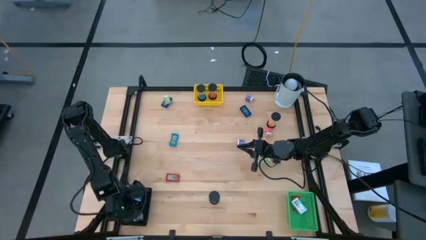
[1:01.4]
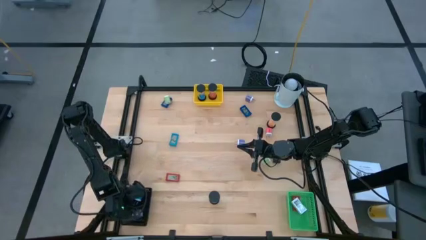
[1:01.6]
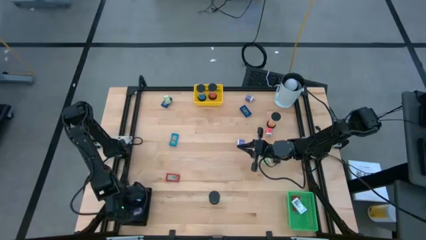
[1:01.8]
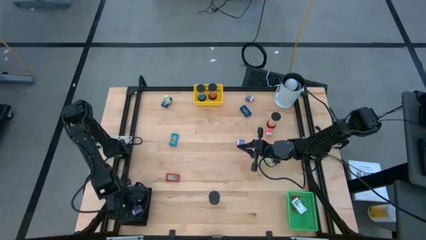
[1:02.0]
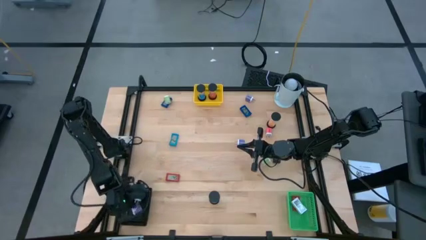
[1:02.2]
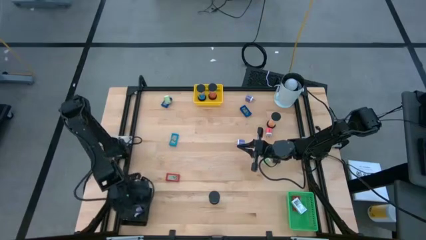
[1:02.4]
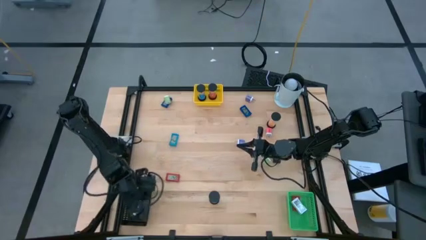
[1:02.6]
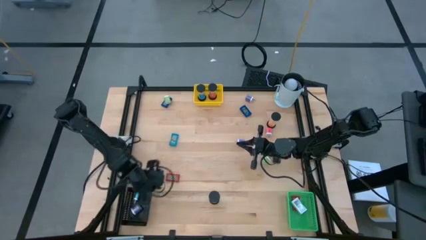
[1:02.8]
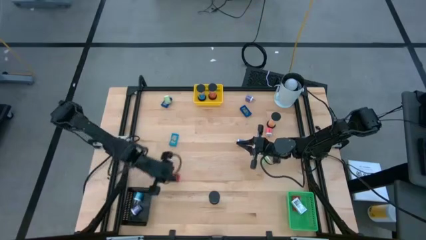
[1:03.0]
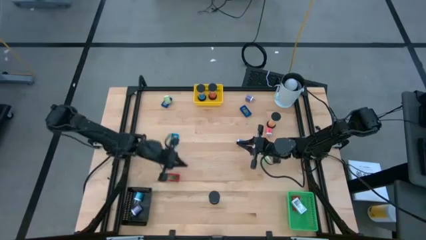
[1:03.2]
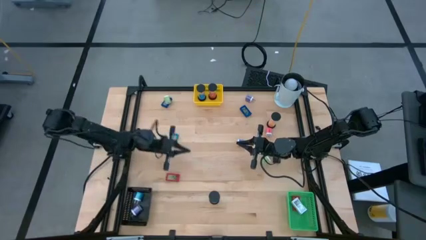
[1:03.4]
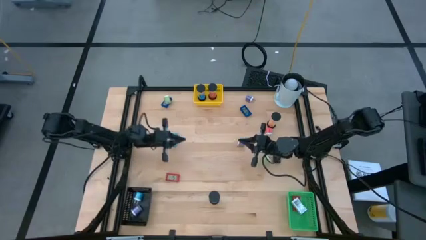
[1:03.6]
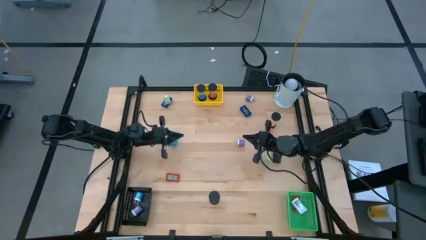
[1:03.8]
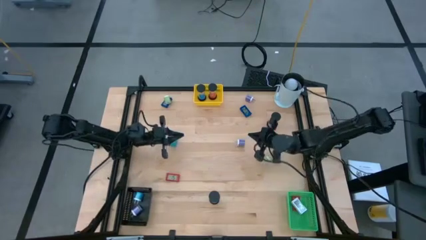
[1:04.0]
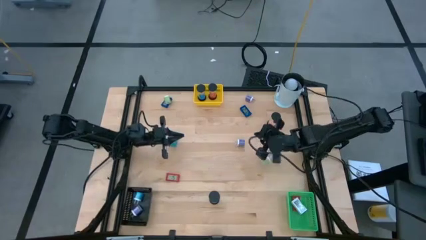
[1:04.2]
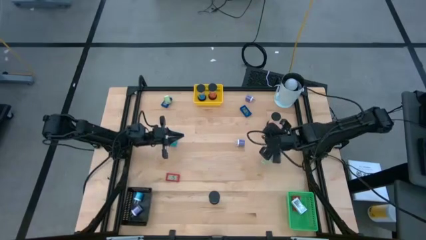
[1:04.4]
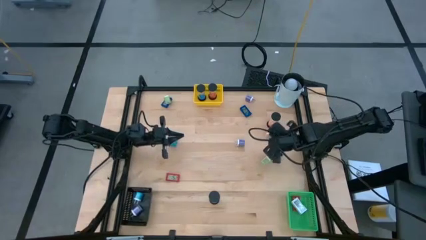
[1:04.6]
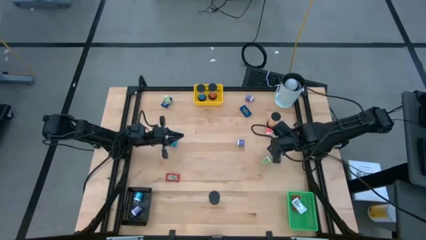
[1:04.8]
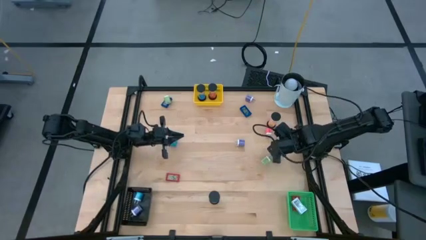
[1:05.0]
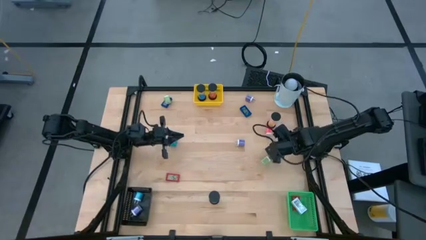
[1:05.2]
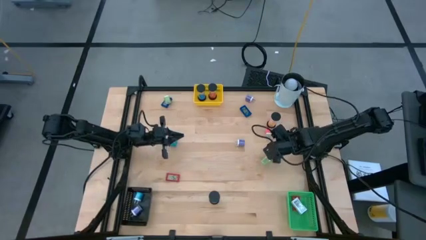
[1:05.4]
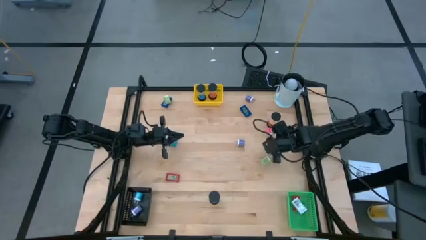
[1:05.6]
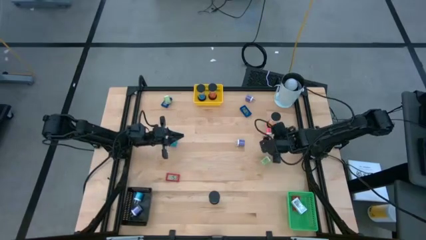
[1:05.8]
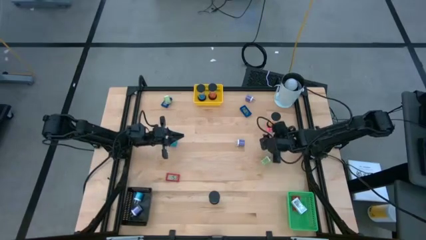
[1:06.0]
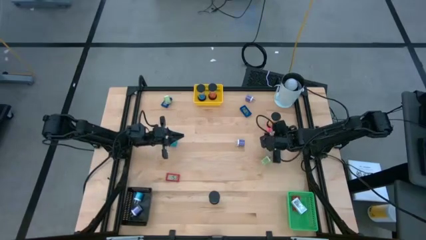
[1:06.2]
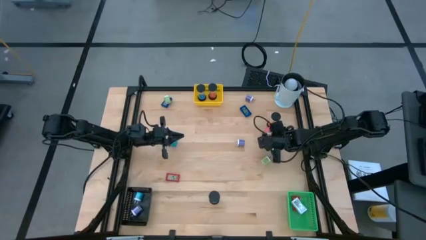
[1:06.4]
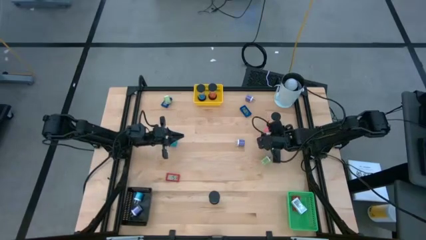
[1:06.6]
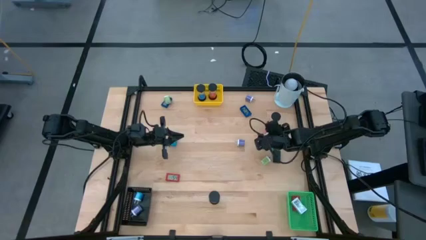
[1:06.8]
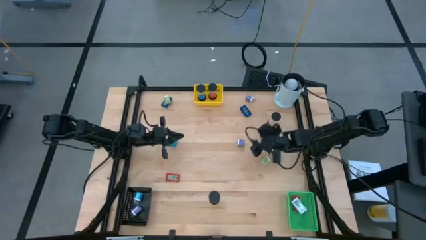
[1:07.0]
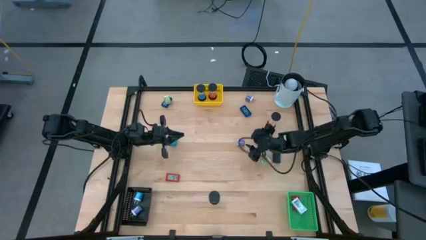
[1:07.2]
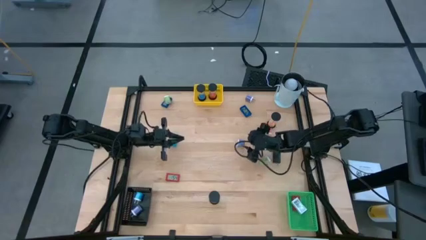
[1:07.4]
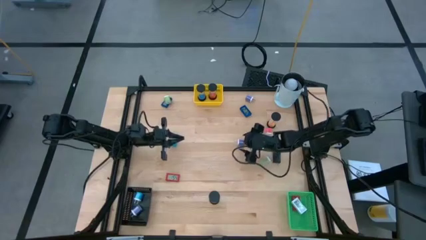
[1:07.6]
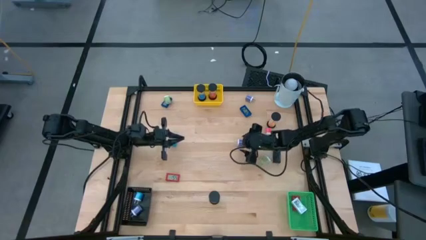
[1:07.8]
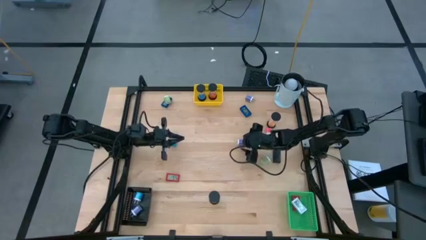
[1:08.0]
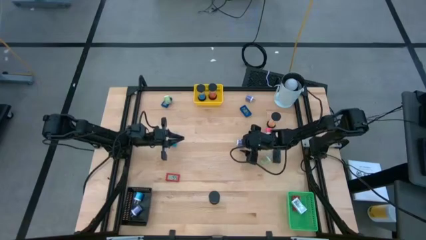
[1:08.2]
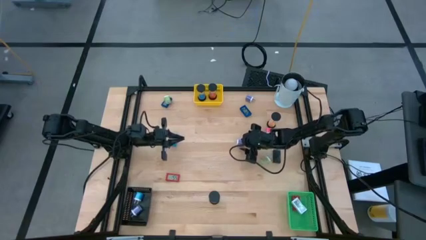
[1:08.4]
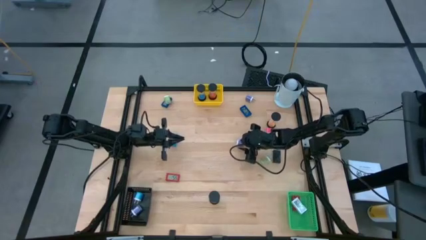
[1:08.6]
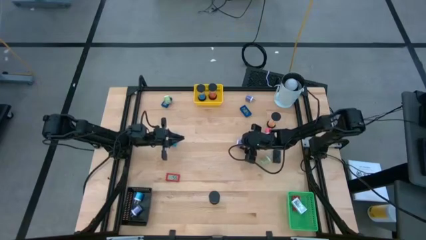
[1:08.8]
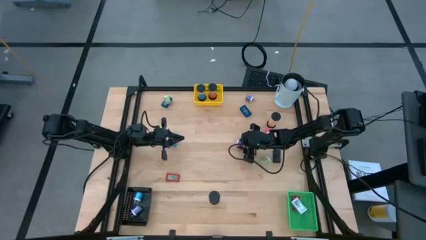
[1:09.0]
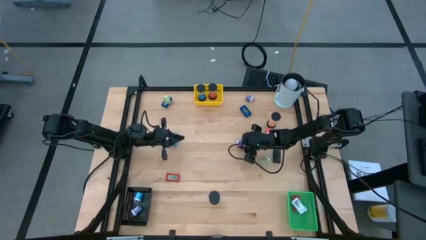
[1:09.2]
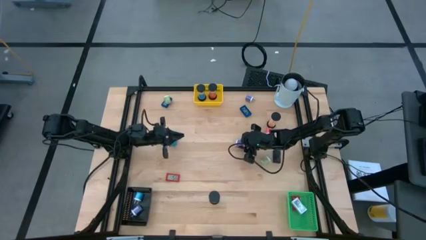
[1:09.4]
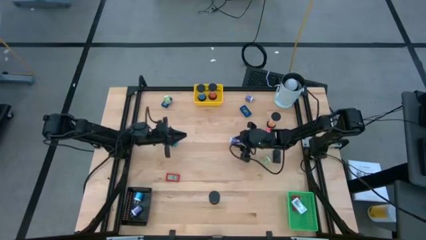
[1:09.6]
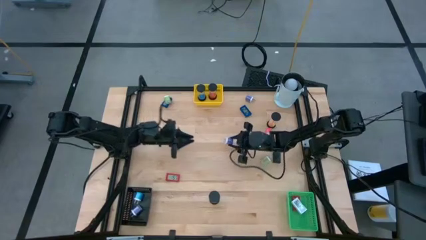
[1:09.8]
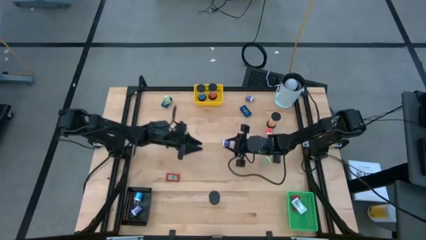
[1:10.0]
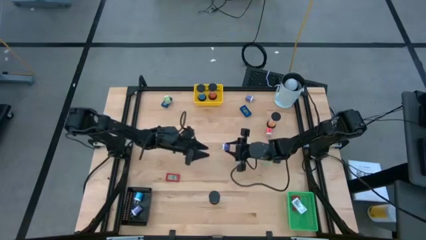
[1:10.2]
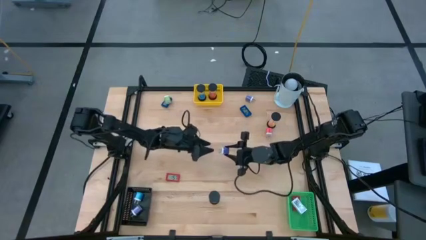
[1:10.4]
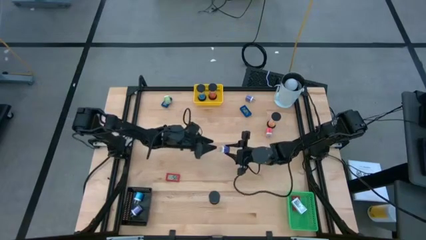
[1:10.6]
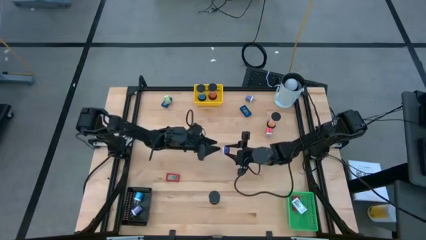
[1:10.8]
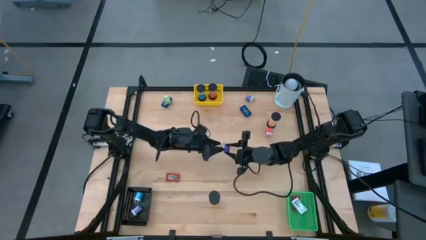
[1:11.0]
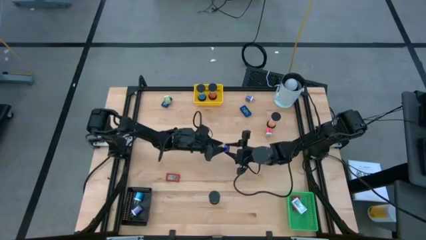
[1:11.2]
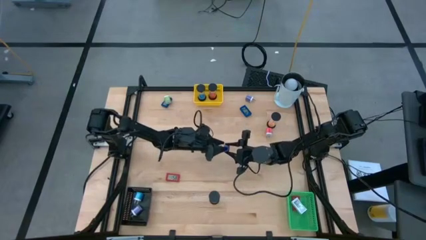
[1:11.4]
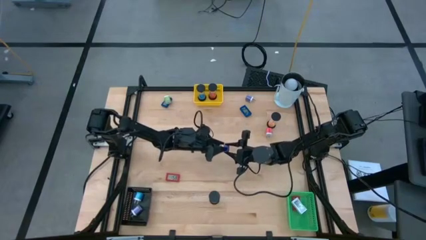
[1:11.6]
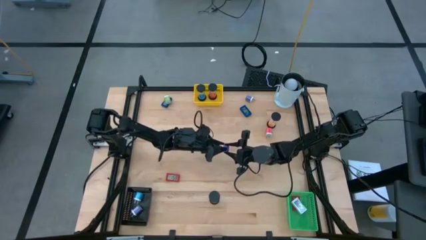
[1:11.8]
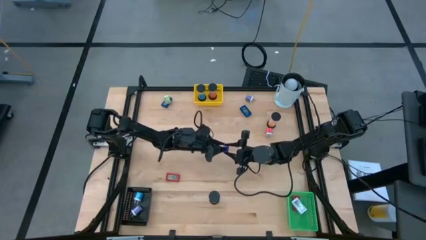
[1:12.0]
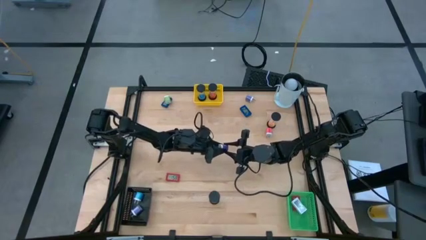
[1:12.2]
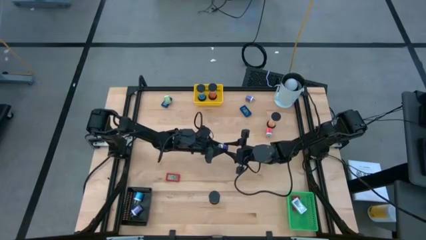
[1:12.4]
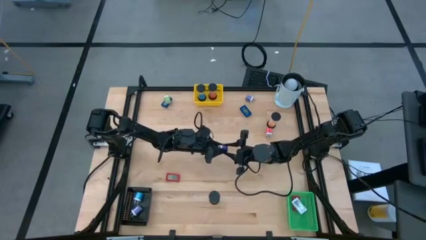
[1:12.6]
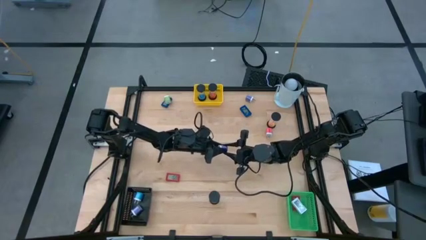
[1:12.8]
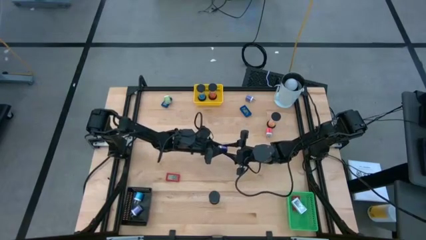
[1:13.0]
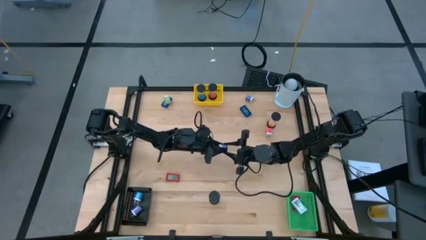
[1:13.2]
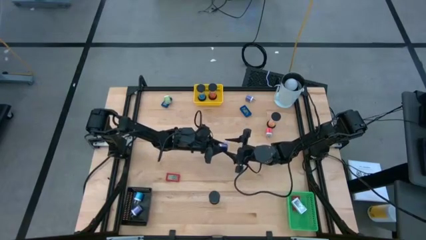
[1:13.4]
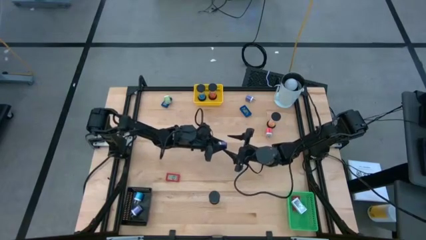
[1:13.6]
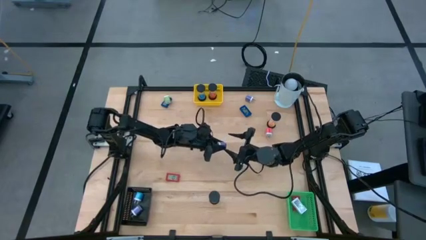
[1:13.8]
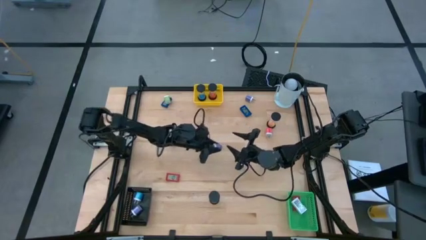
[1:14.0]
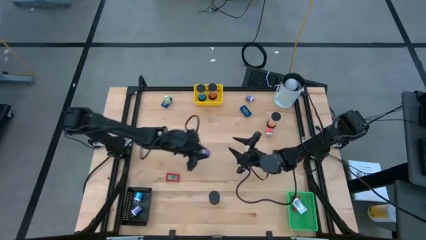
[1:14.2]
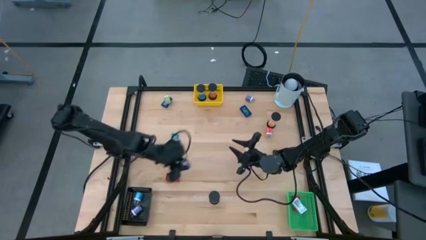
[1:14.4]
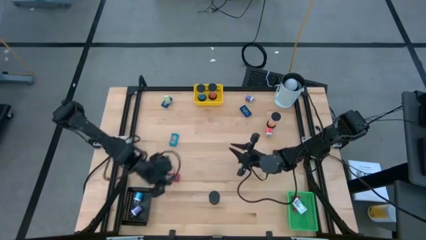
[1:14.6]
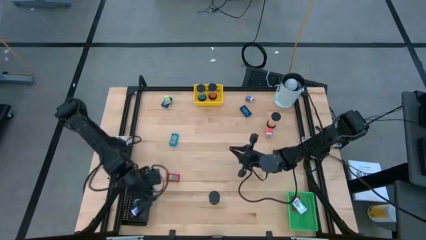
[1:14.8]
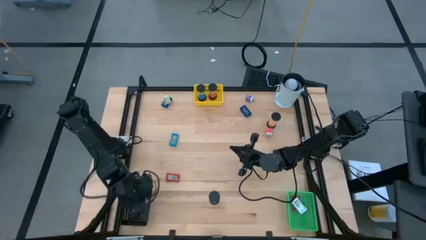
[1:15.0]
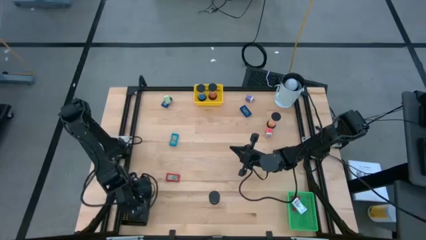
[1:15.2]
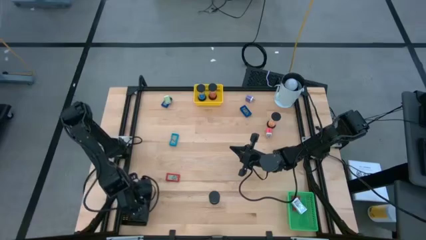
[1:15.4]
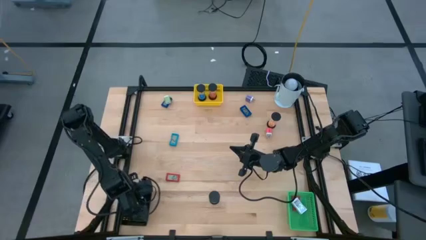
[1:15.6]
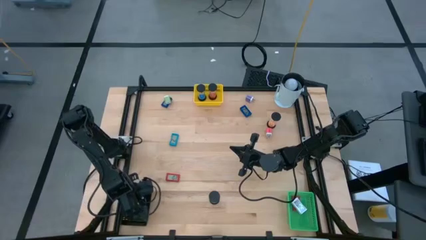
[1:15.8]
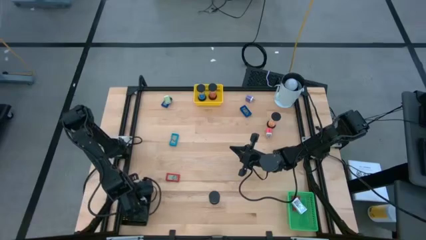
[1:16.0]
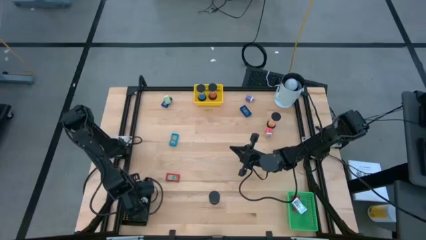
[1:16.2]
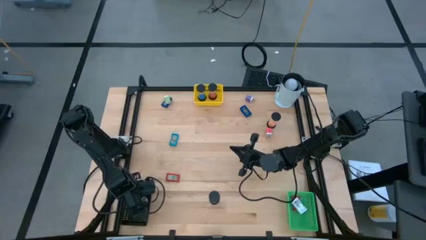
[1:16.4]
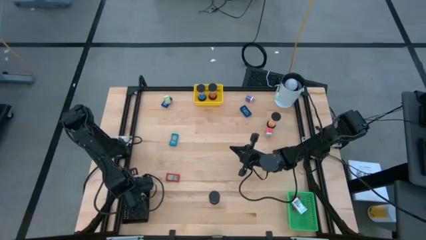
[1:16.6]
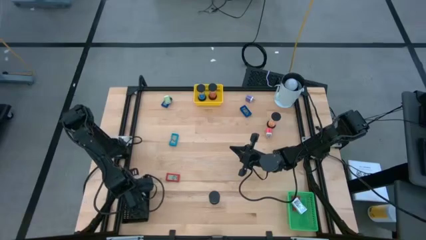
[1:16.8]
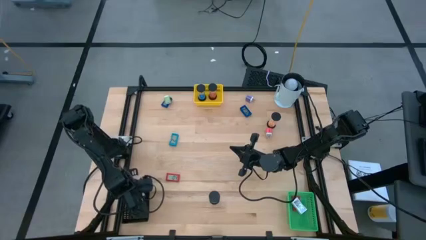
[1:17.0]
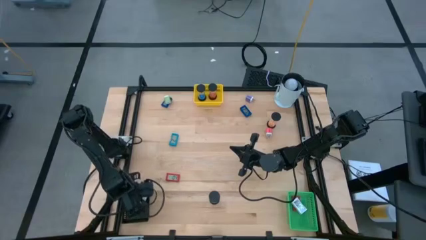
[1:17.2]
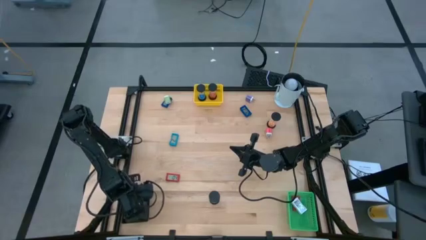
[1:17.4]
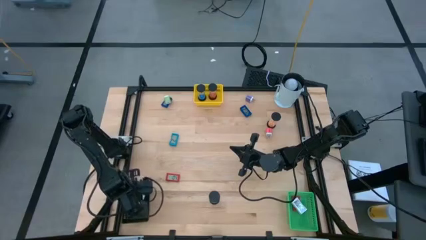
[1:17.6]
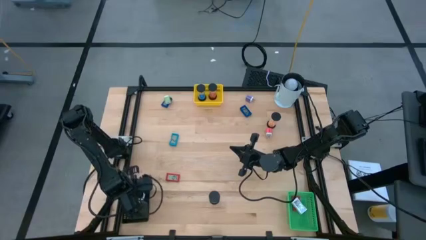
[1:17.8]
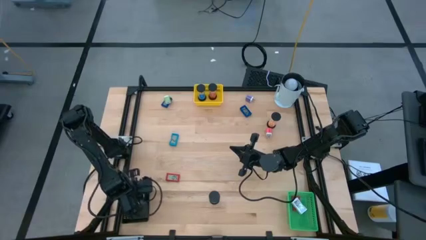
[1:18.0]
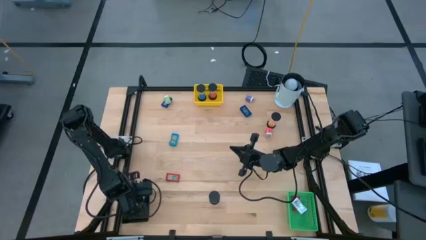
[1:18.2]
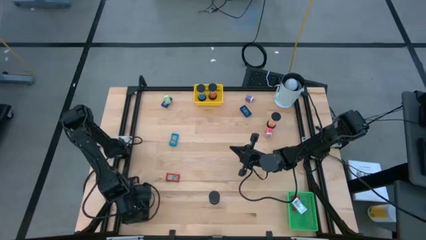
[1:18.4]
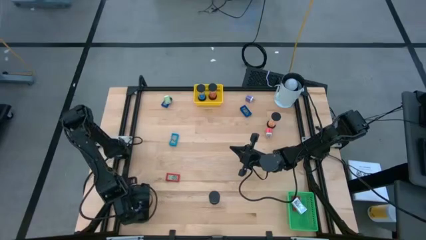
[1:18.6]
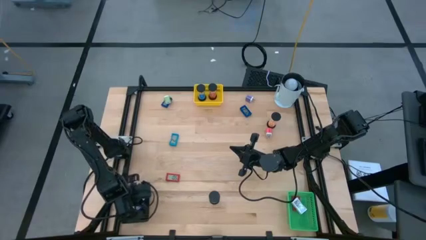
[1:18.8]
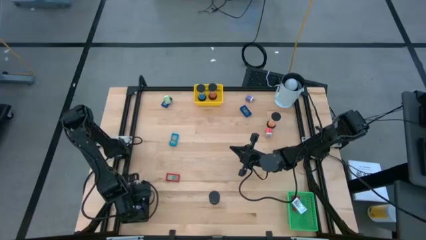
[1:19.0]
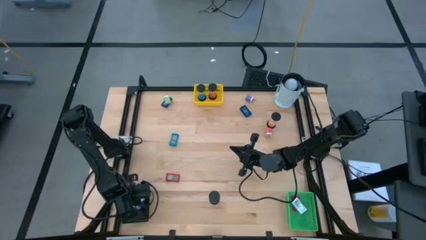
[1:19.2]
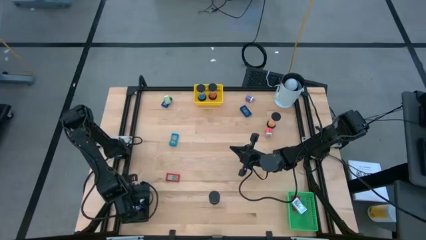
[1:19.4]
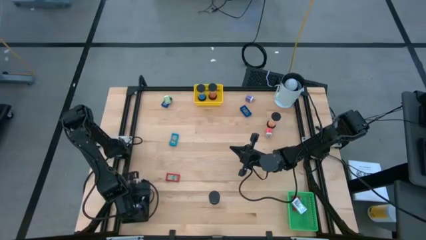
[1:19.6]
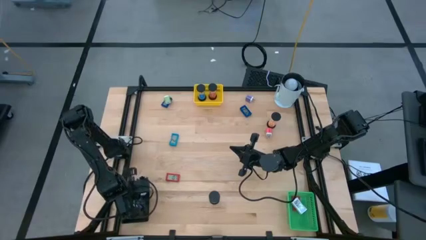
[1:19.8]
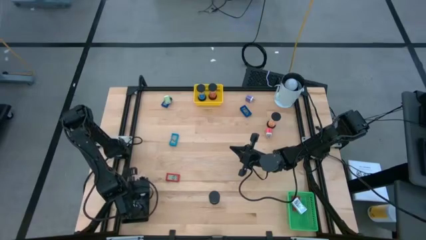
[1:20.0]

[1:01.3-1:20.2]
Task: Pick & Place Office items
Put the purple charger adapter into the black bin
